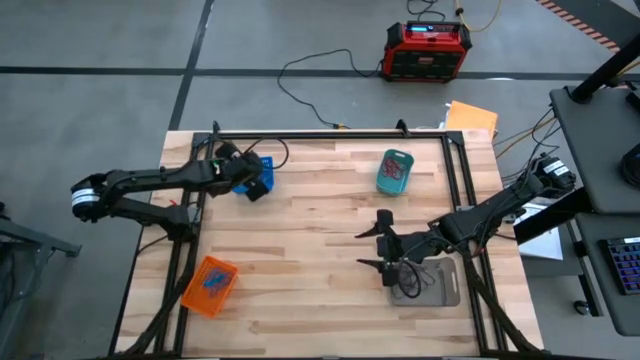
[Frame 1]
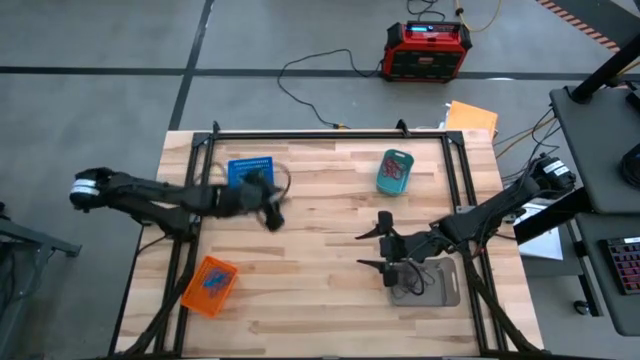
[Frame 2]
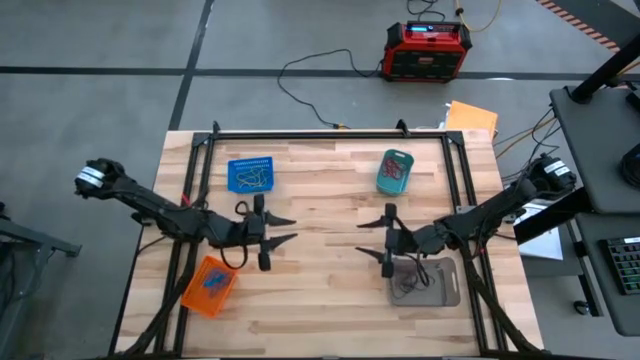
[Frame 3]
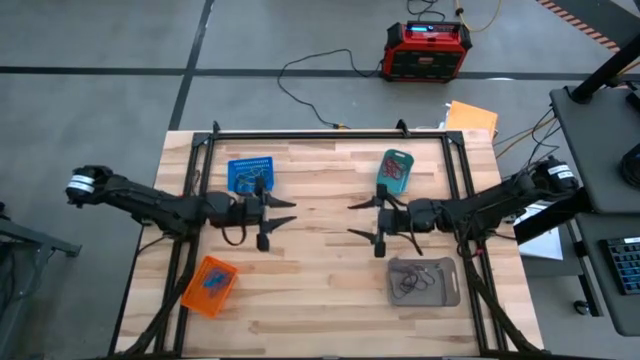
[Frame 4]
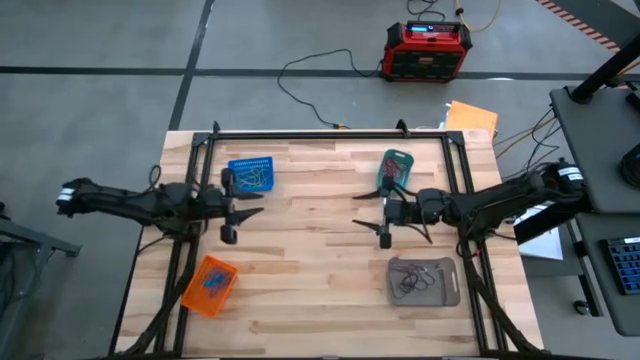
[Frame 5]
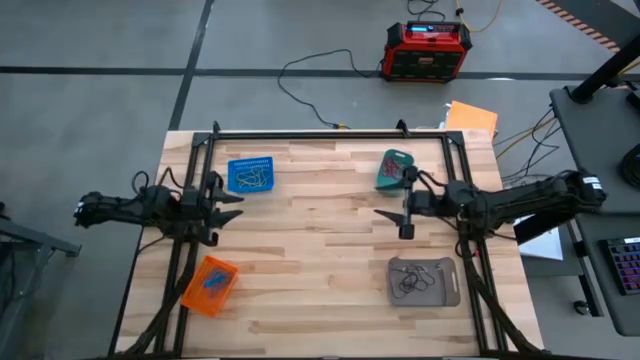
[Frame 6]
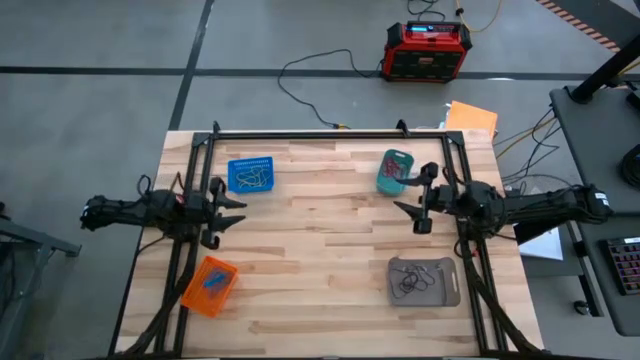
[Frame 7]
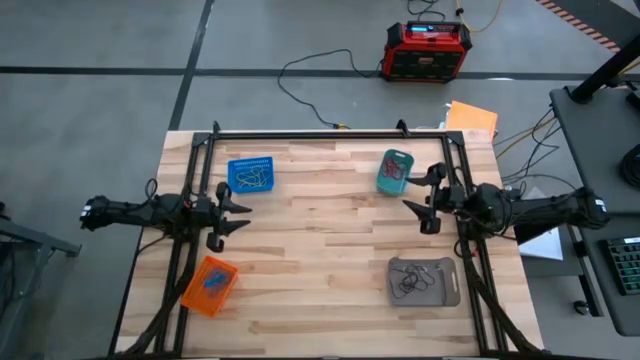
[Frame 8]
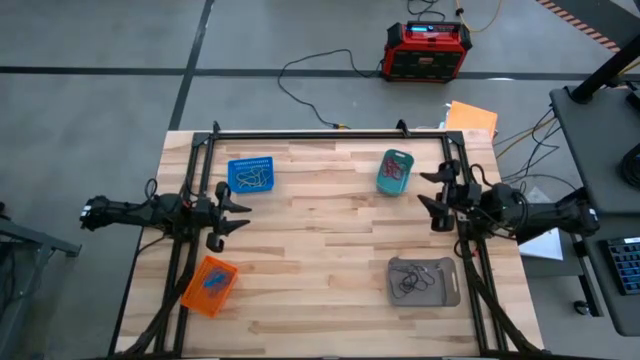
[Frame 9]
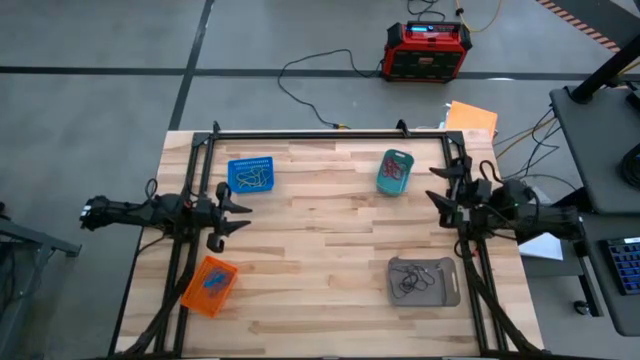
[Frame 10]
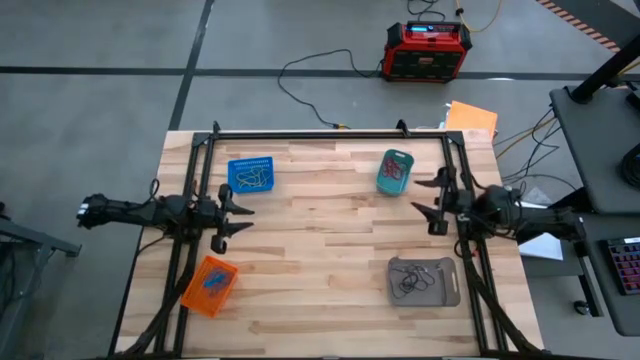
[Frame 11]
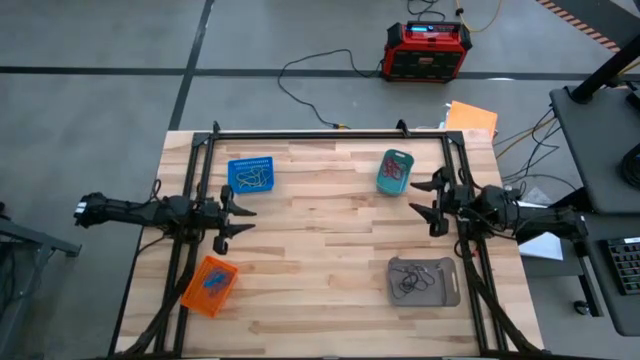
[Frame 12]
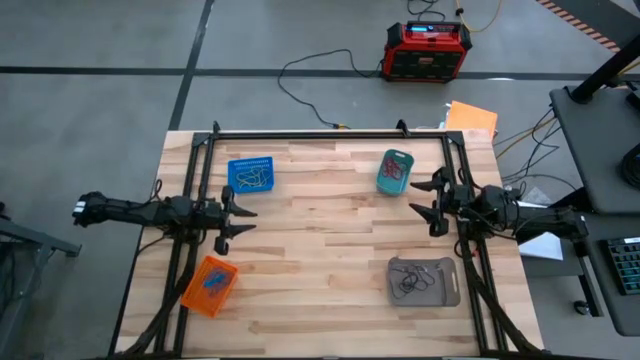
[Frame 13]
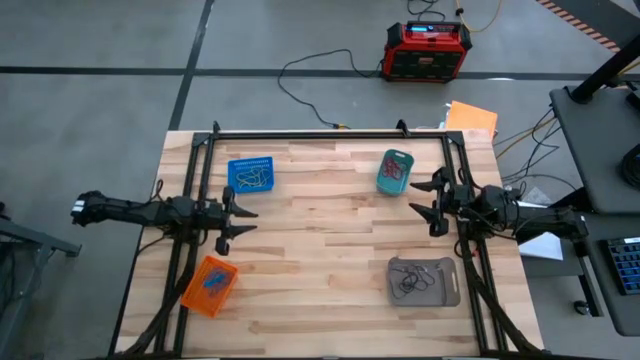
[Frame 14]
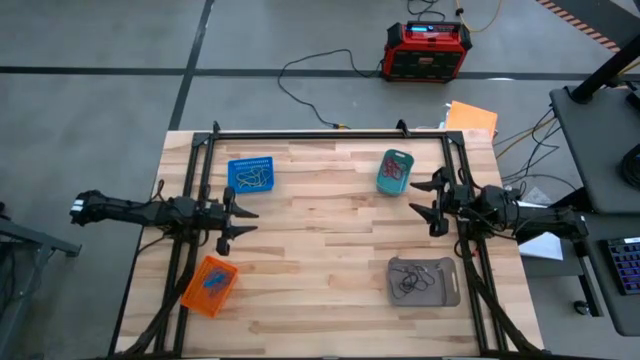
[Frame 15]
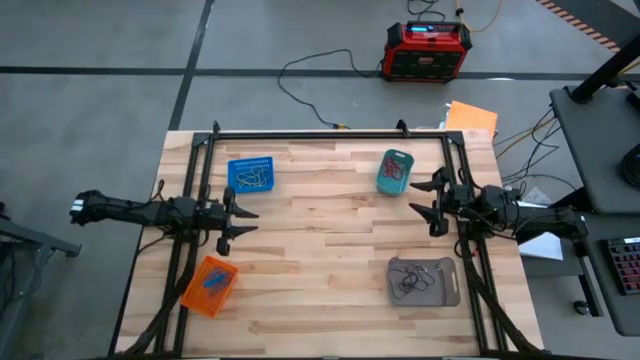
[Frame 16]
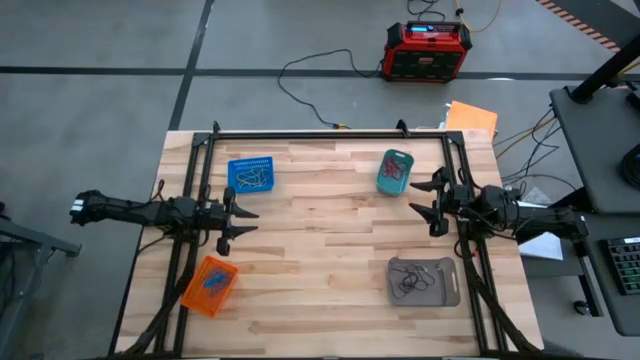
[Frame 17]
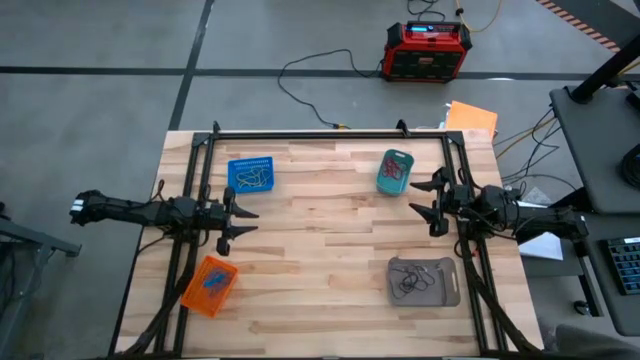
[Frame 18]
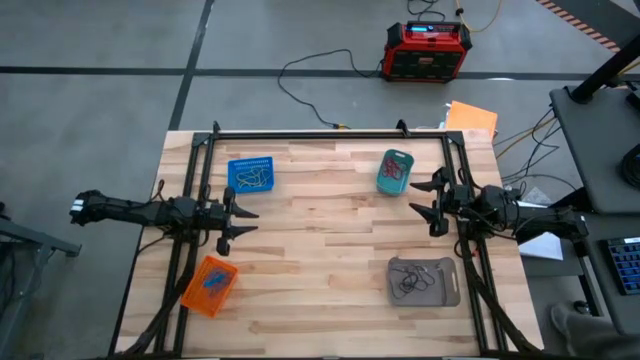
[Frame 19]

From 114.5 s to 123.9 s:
Task: Sort rubber bands into baskets
Return to Home Position

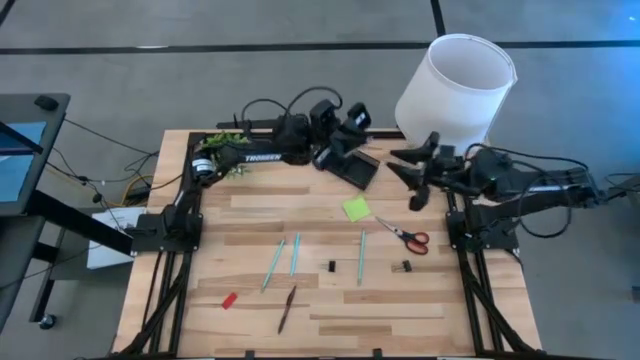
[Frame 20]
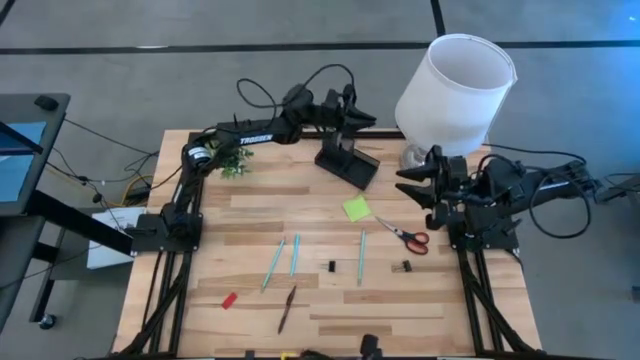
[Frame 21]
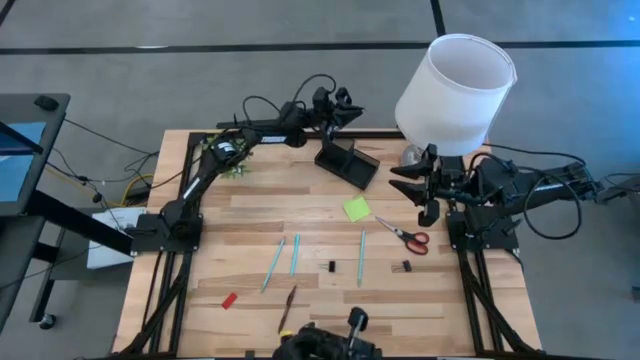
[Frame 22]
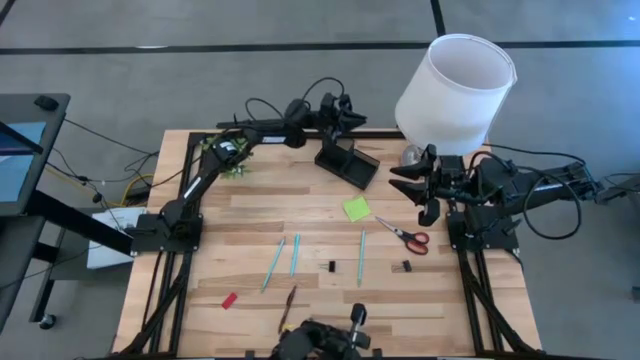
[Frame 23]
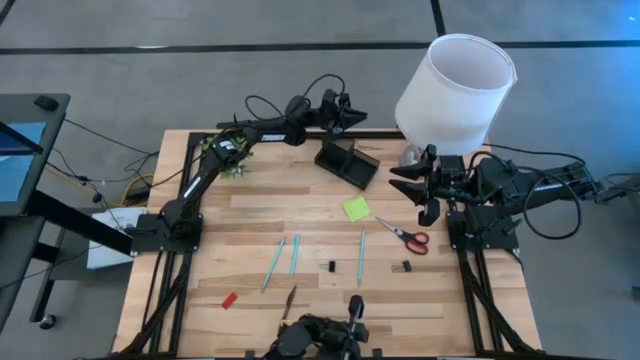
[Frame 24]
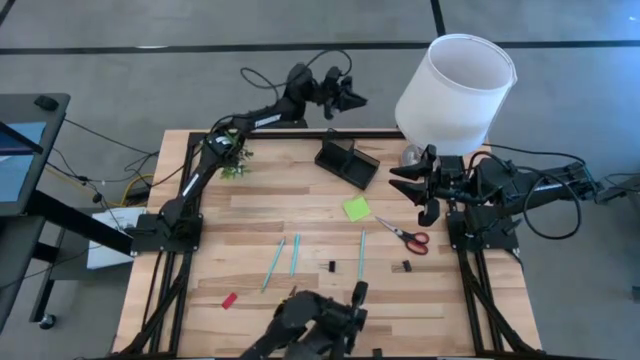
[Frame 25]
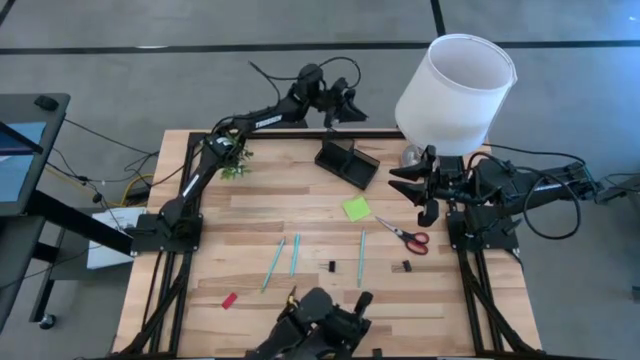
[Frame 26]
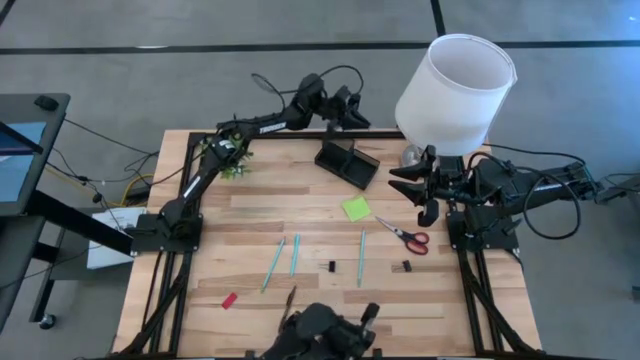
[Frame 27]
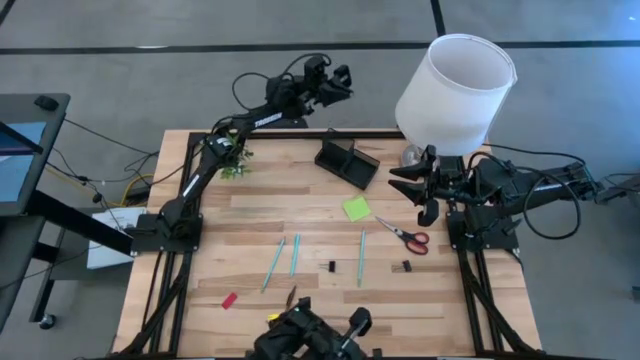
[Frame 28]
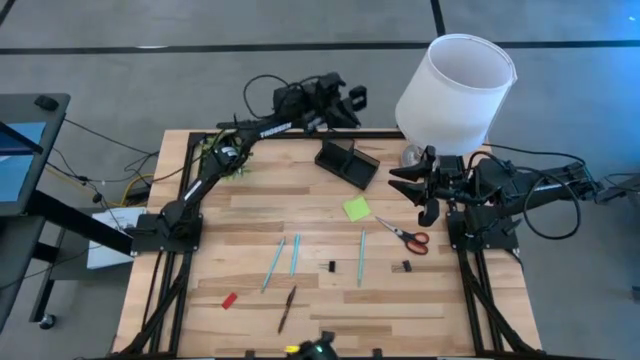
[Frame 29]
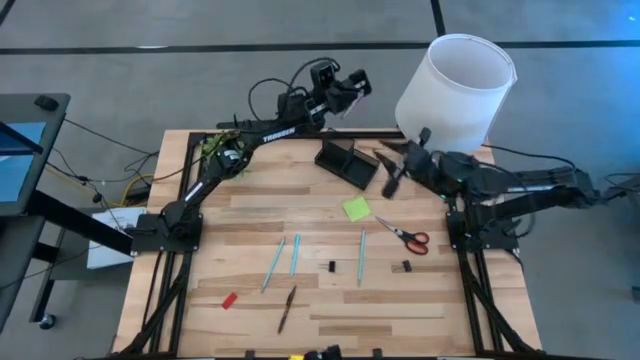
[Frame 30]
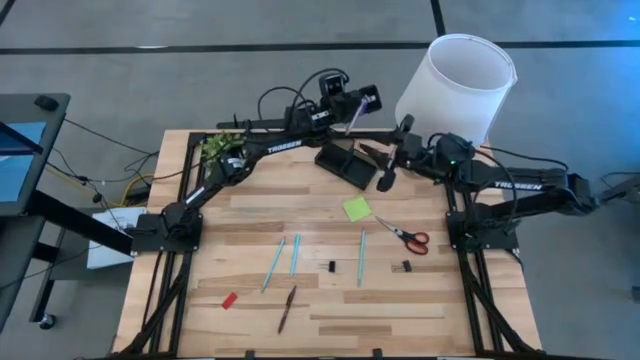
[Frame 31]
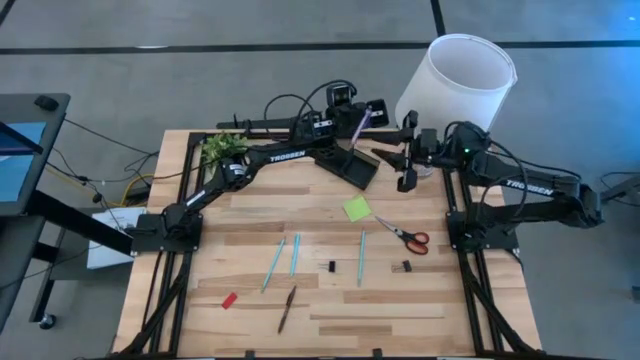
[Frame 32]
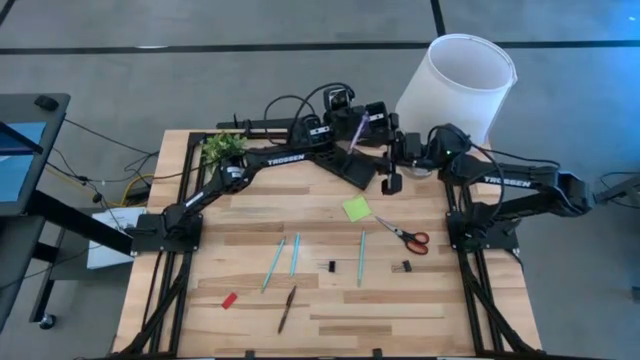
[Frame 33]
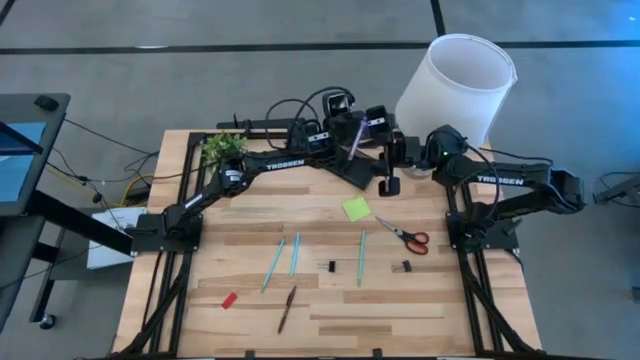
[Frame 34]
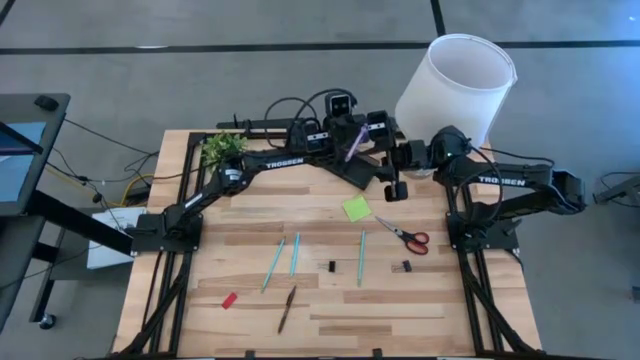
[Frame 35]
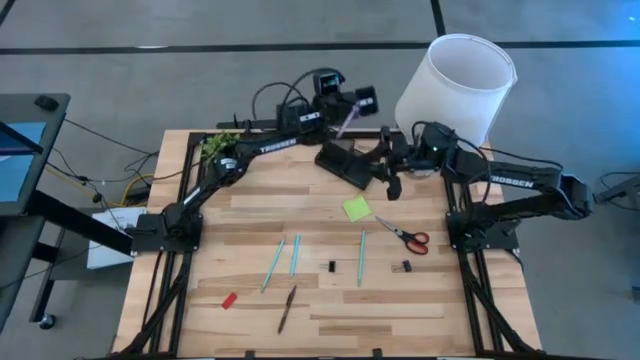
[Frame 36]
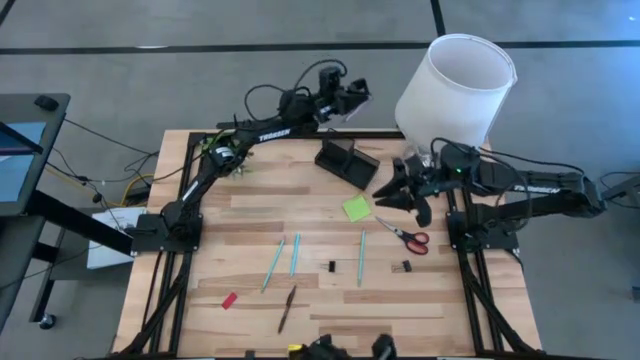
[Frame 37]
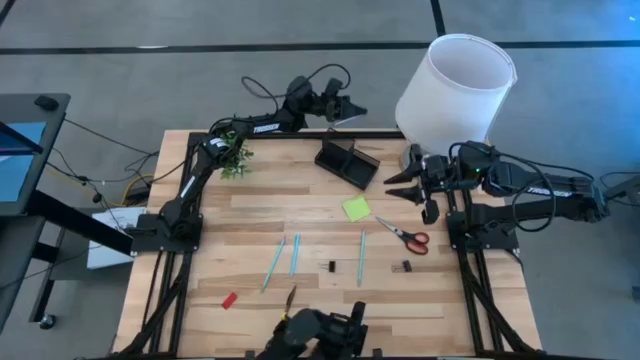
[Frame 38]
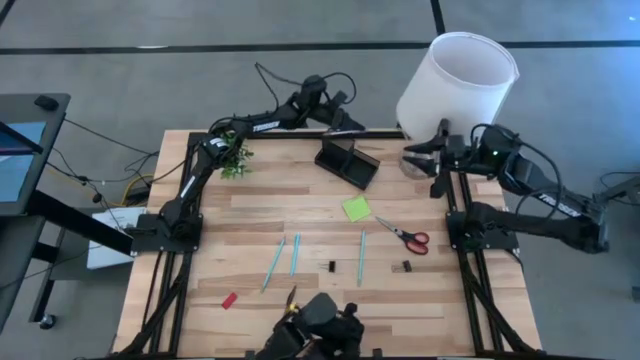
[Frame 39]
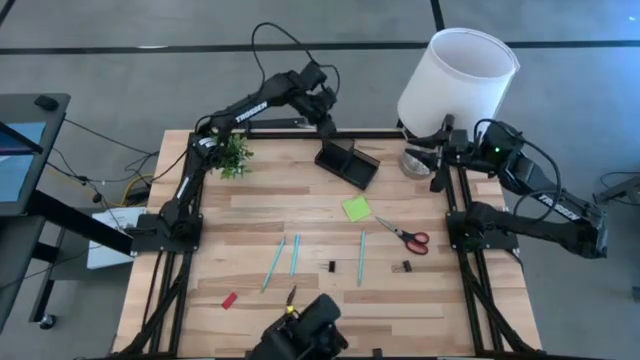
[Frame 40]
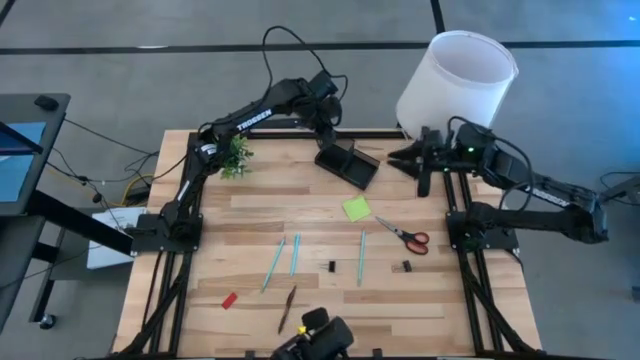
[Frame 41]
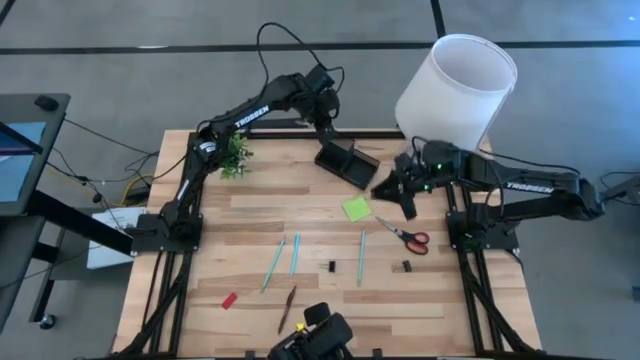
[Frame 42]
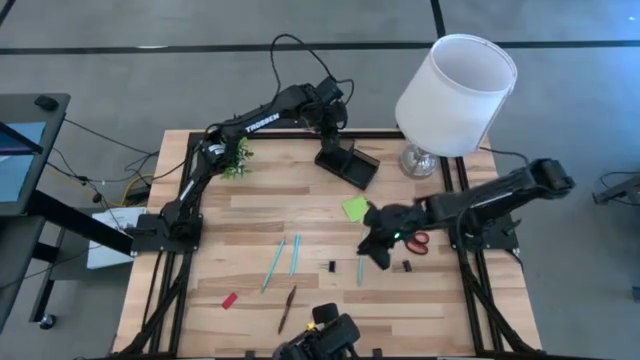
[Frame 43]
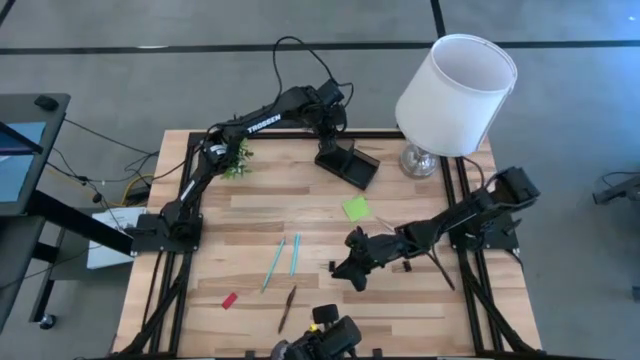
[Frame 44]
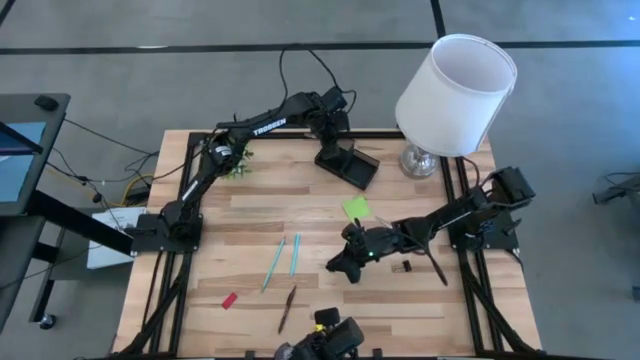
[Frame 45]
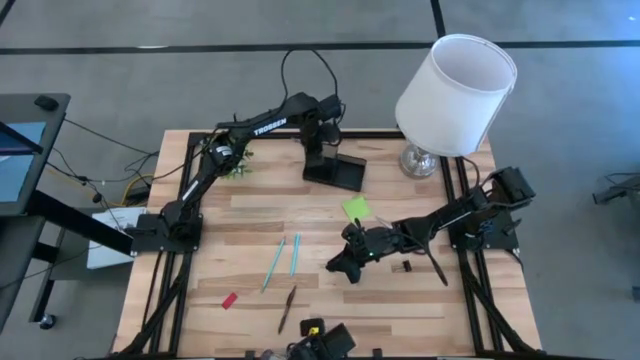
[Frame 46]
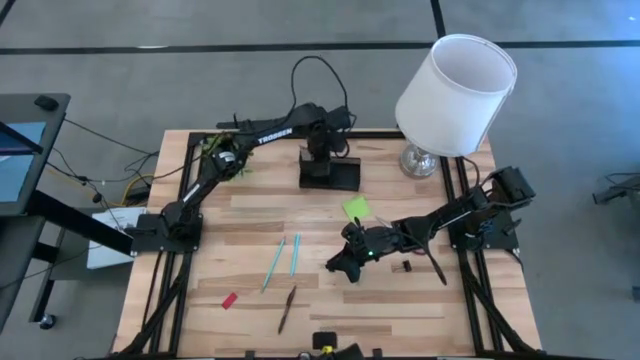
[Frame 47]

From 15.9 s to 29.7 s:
Task: Pick and place office supplies into organizer
Put the purple pen into the black desk organizer
